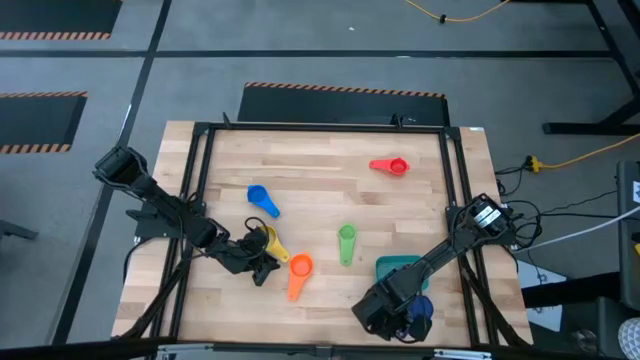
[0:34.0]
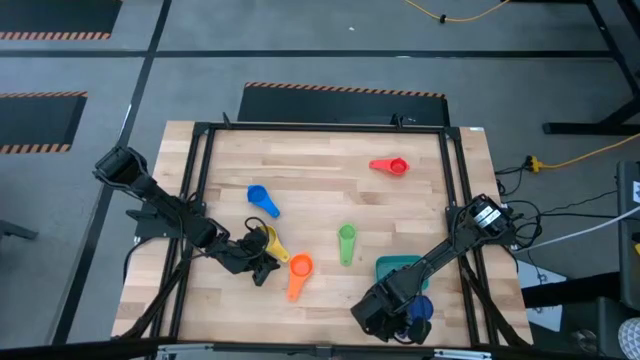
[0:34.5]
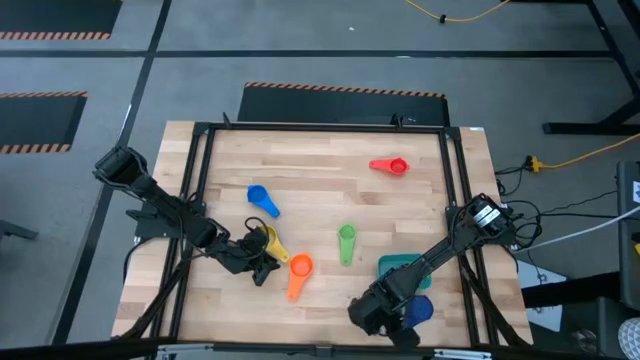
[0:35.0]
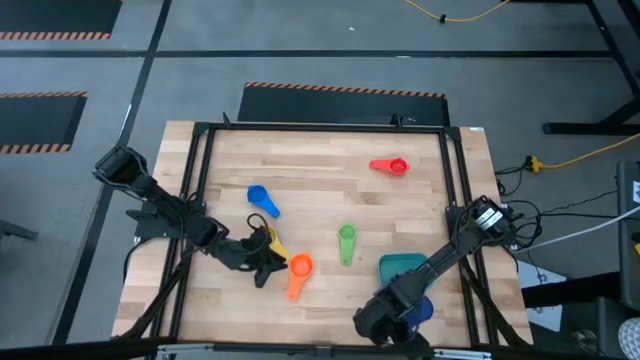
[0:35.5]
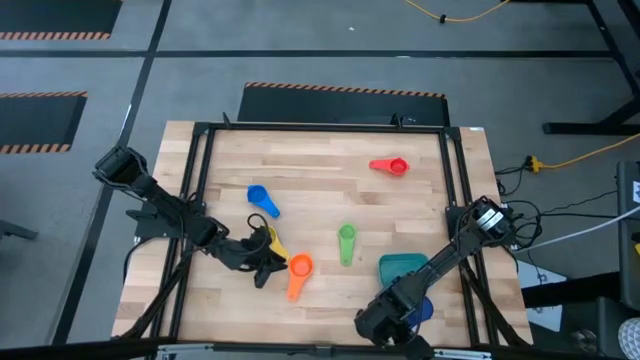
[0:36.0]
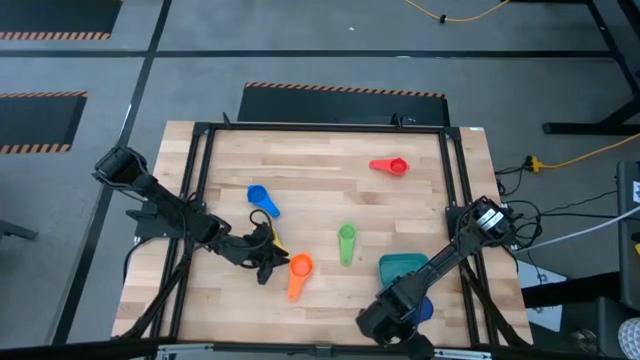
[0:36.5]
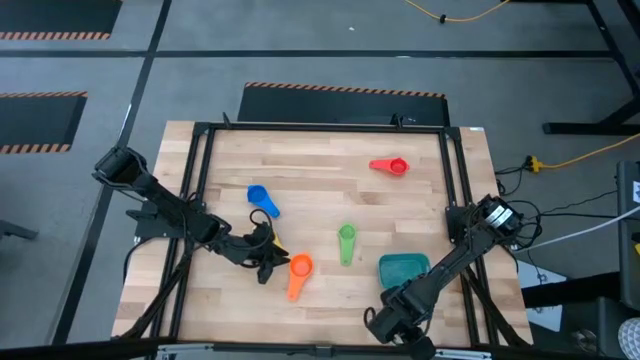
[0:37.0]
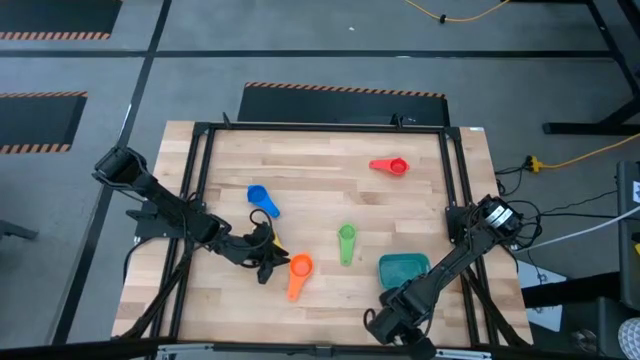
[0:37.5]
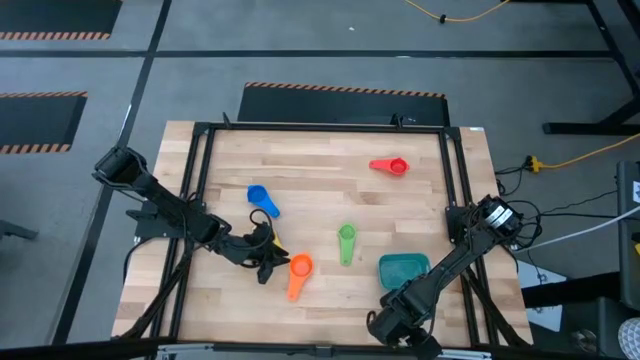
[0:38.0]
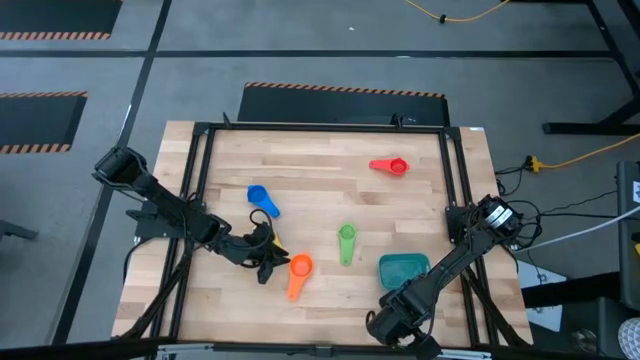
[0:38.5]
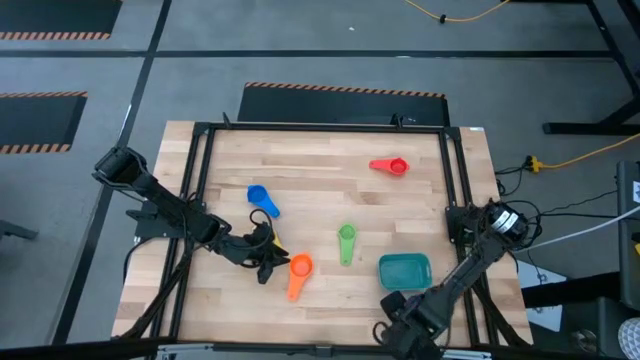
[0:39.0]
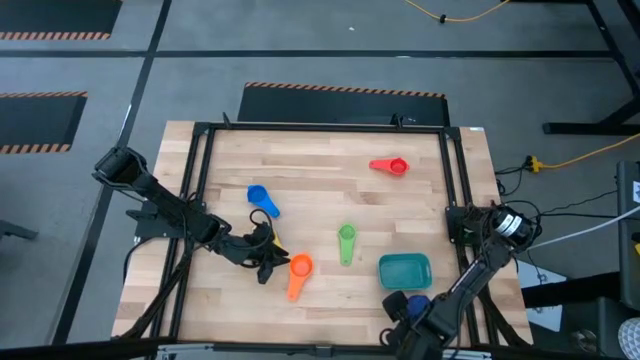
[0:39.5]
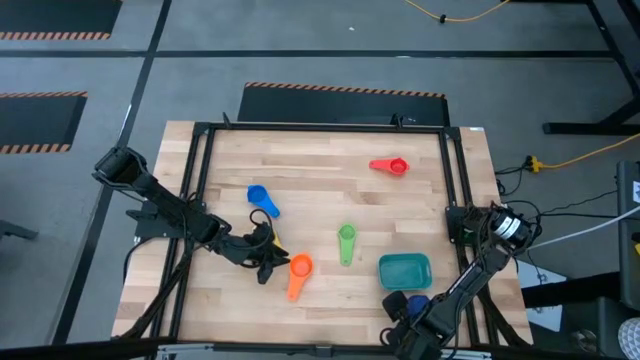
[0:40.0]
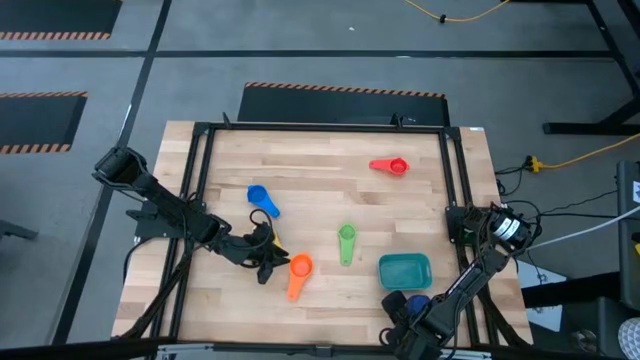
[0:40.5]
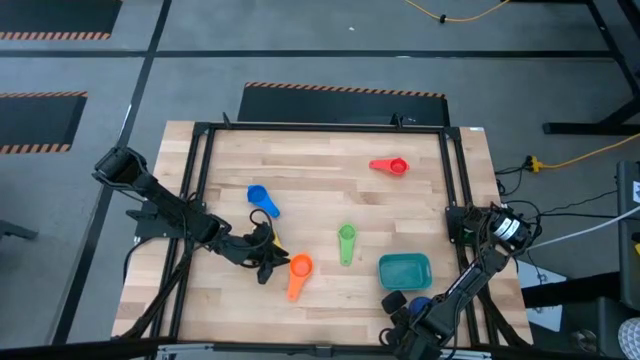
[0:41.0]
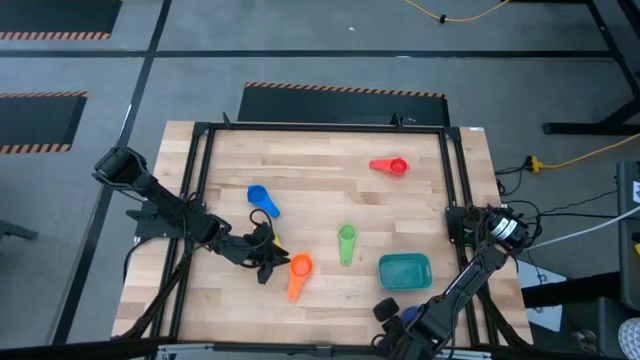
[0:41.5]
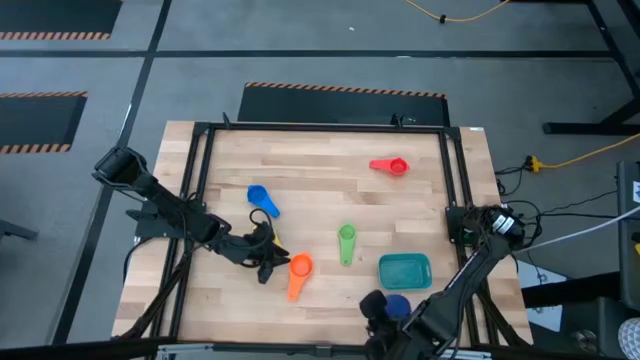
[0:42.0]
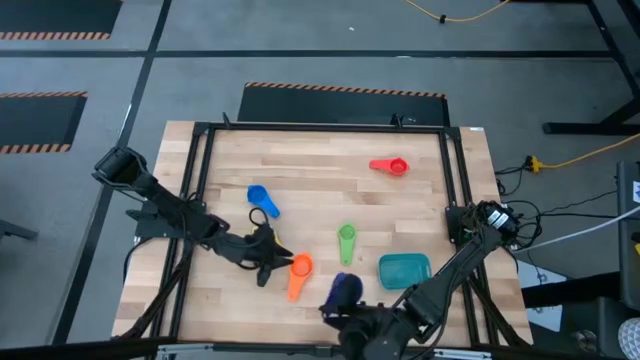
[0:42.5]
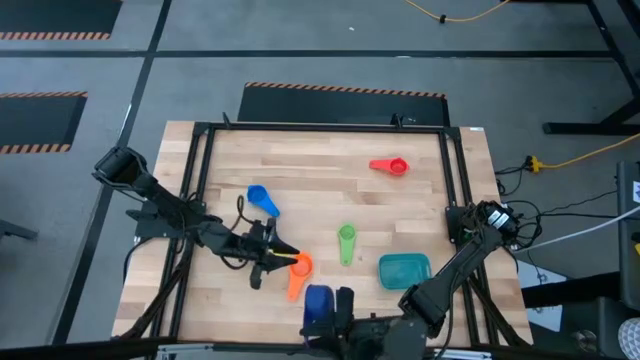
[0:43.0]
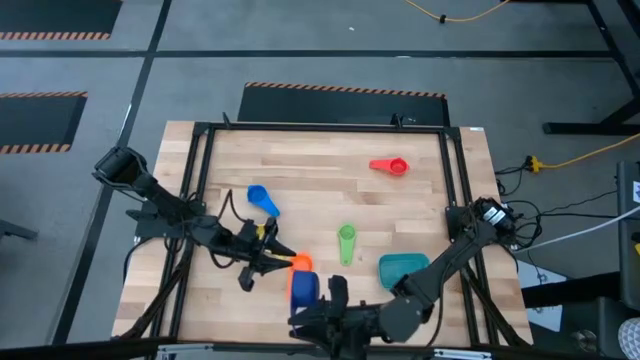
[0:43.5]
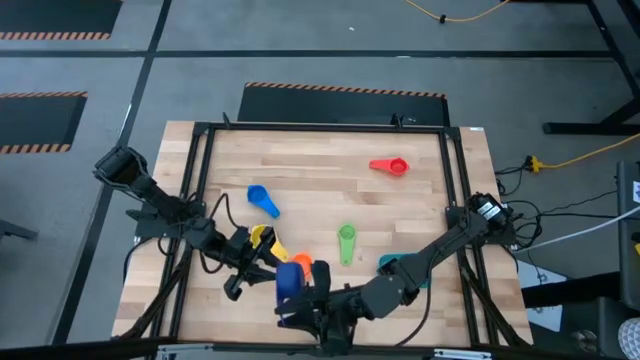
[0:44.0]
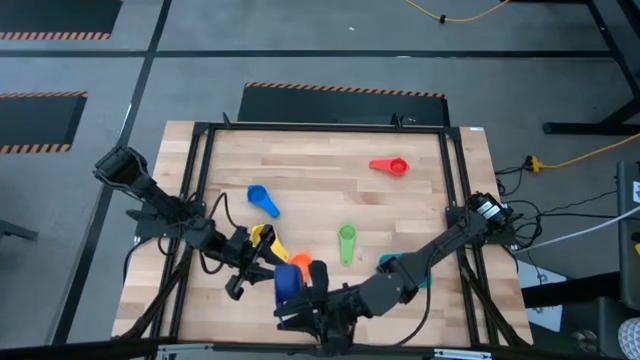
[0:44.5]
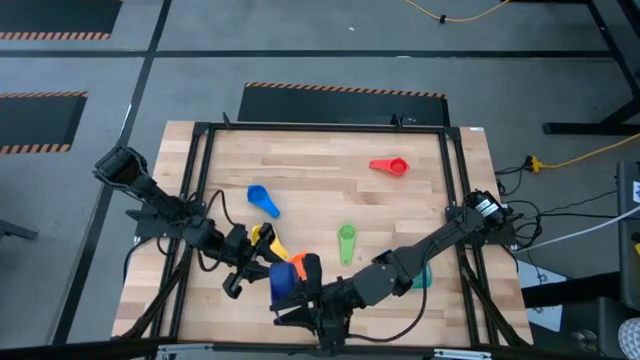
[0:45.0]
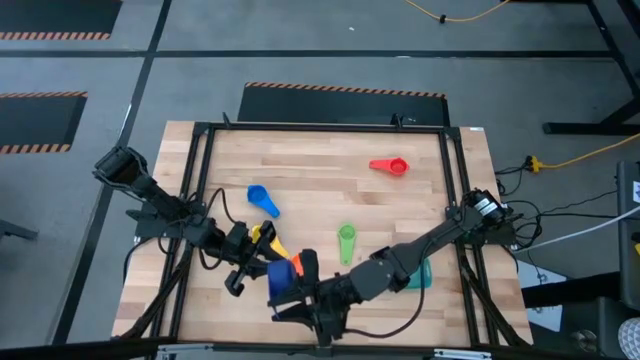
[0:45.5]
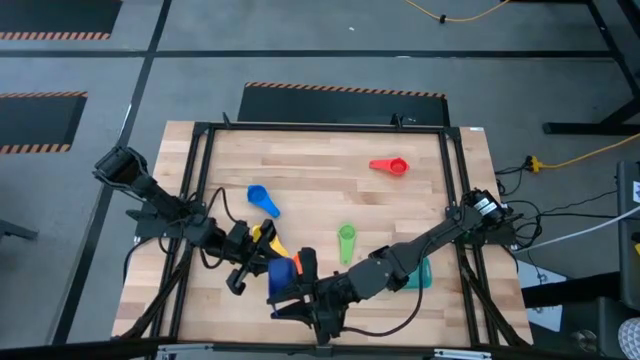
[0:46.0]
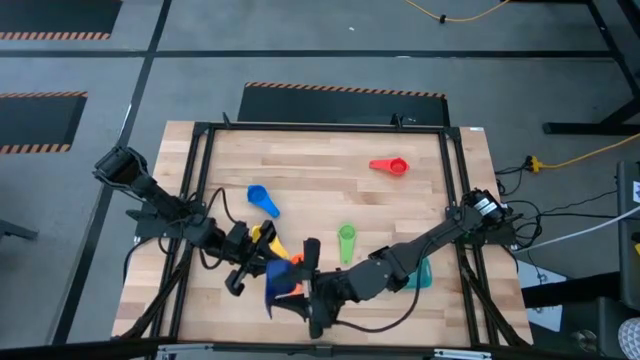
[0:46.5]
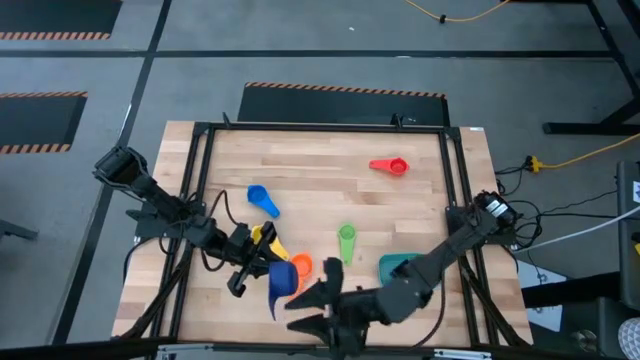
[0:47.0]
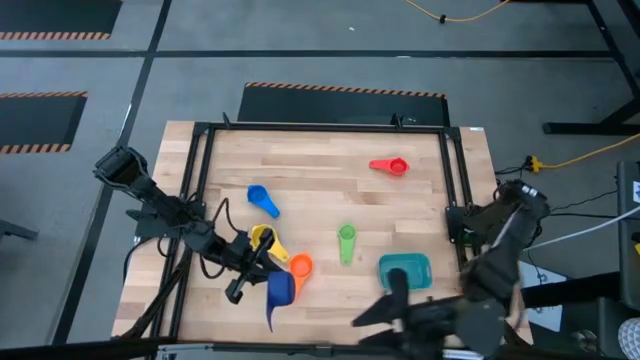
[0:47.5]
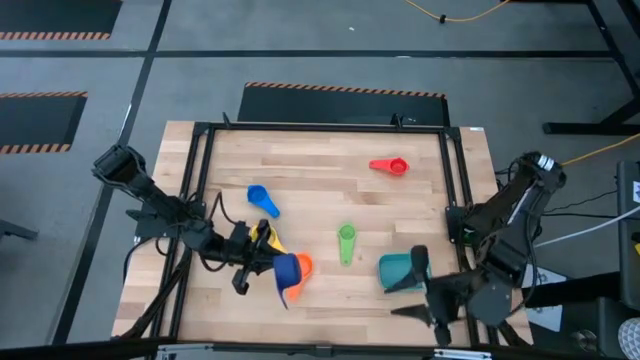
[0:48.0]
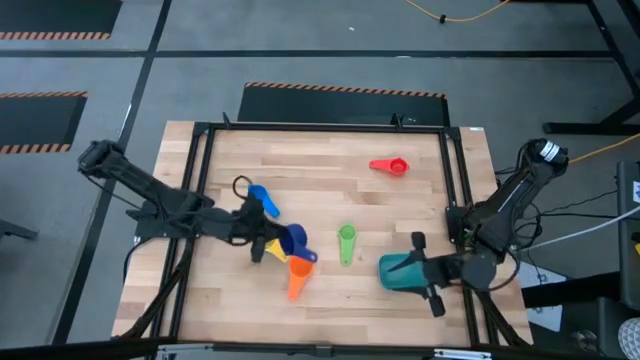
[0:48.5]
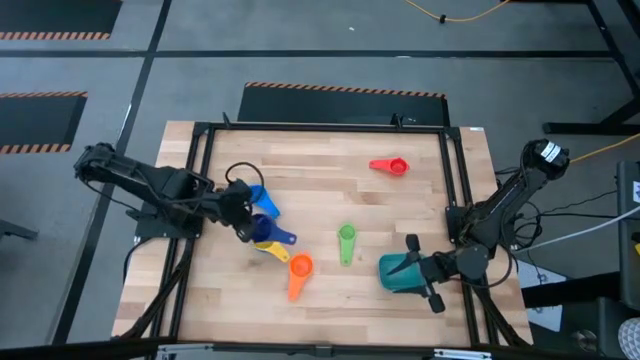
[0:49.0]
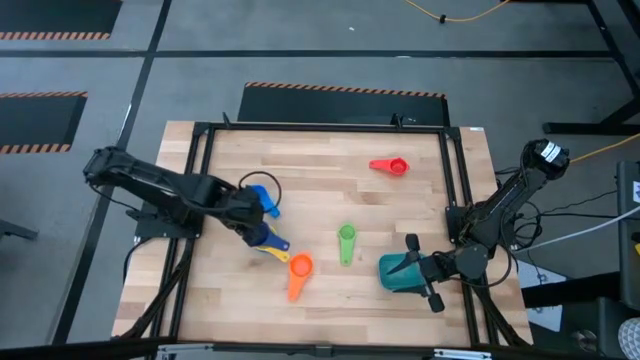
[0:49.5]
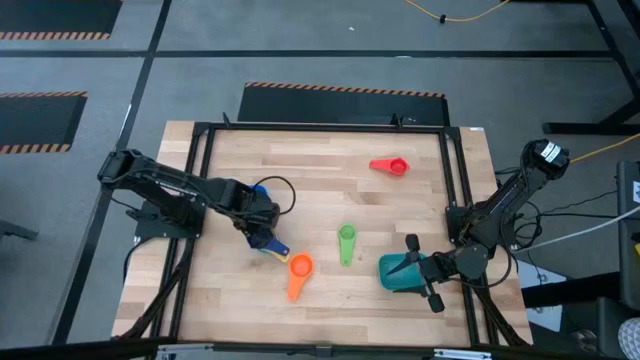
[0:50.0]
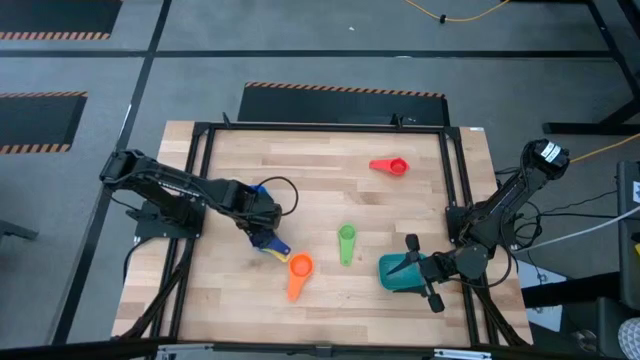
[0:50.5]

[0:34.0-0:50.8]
Task: Nest measuring cups in basket
Stack the dark blue measuring nest cup into the yellow measuring nest cup

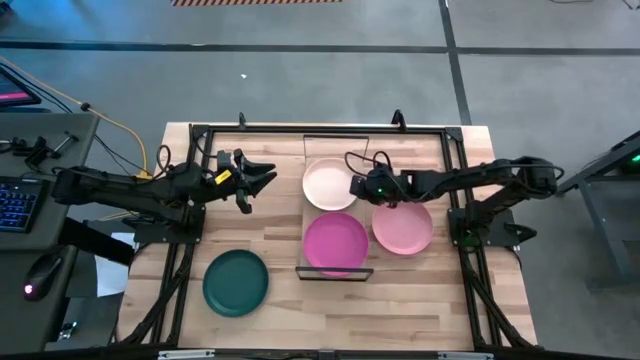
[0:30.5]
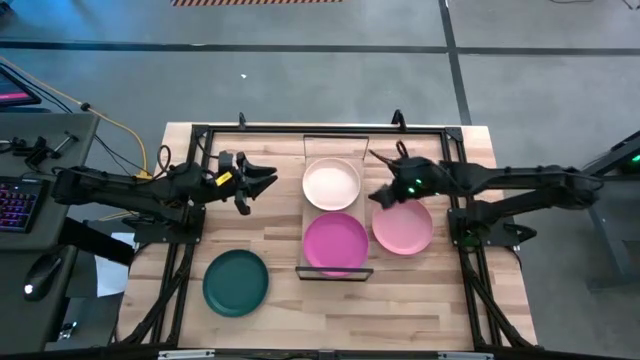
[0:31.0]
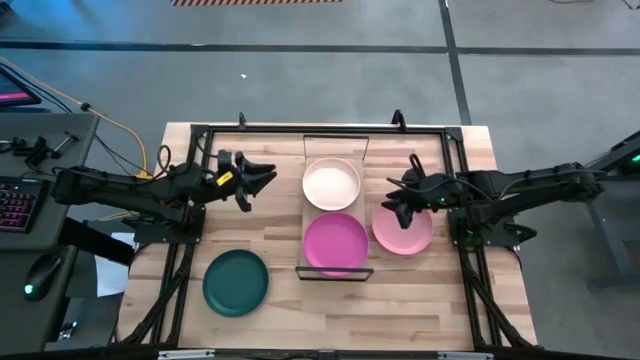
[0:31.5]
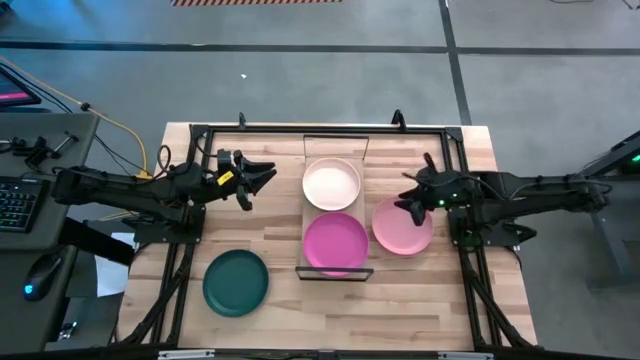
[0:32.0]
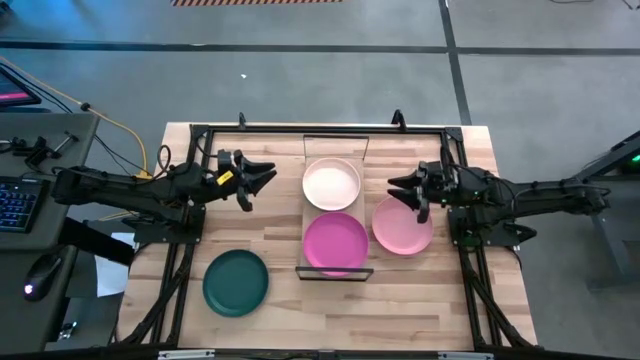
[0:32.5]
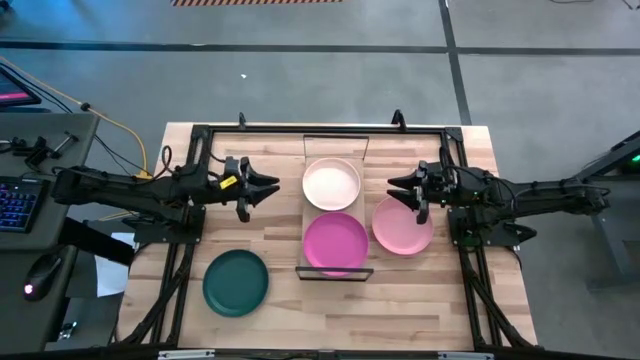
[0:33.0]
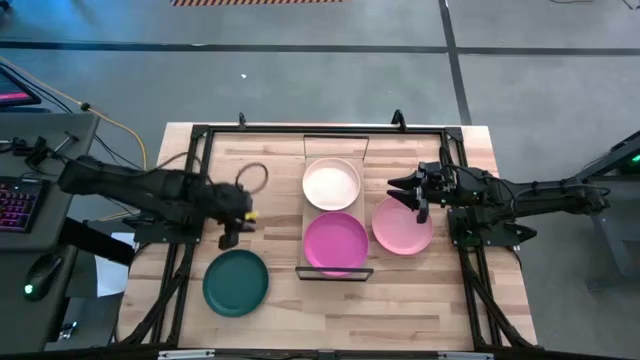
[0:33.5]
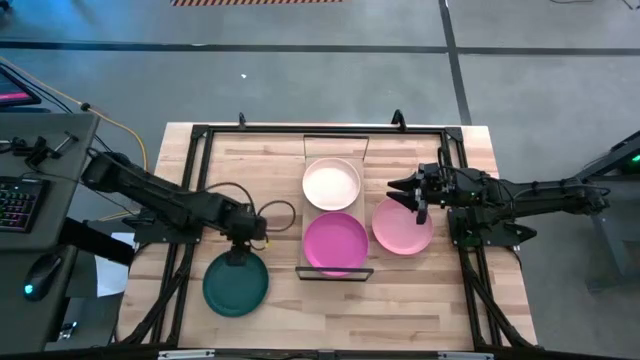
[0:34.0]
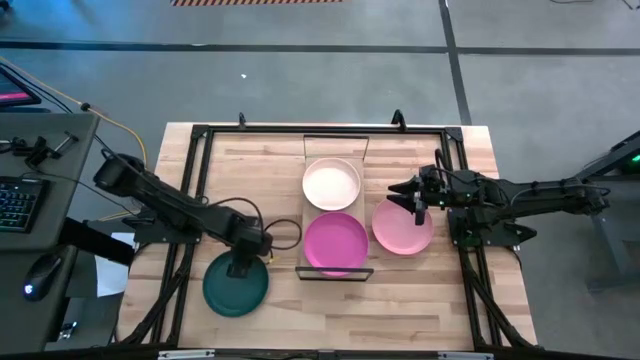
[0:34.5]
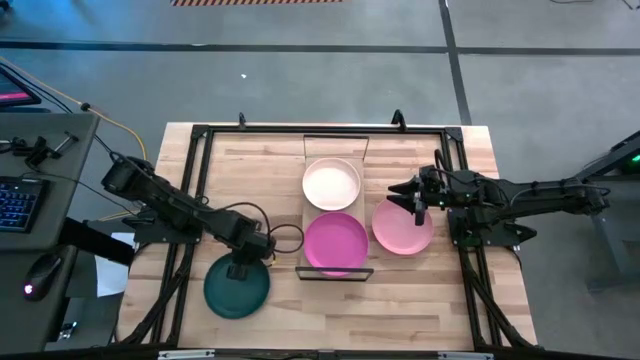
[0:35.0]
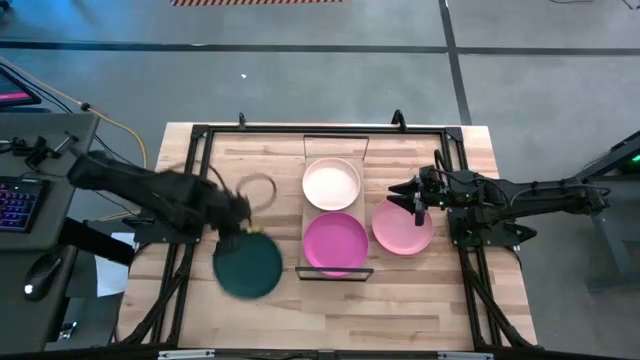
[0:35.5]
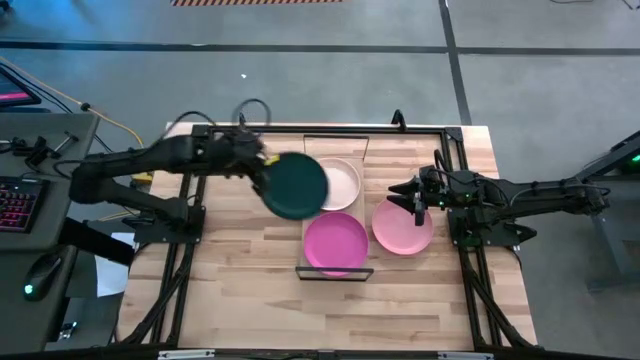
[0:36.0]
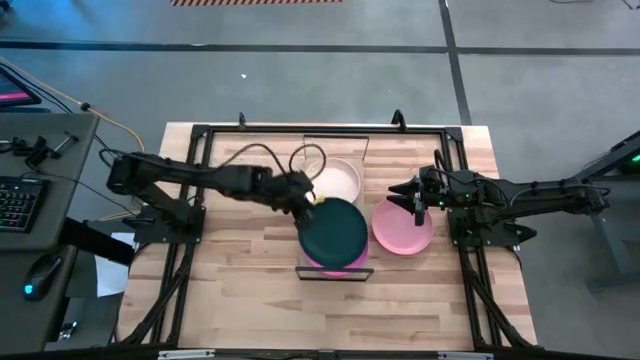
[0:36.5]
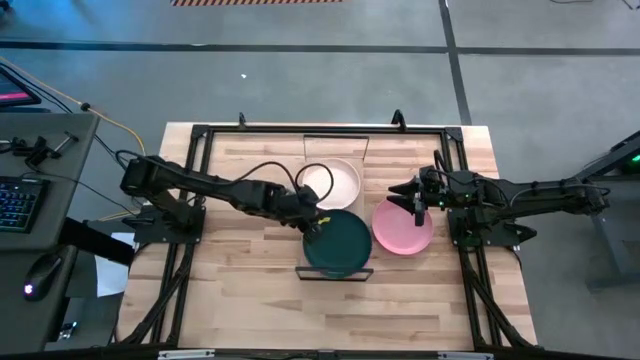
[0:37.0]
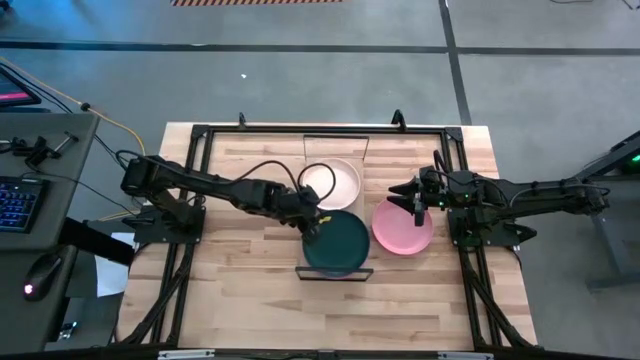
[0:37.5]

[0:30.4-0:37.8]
Task: Place and stack plates onto a shelf
Stack the green plate on top of the pink plate on the shelf
